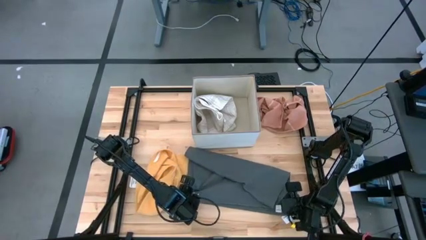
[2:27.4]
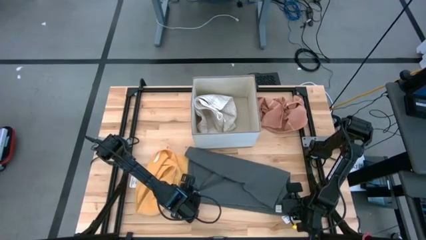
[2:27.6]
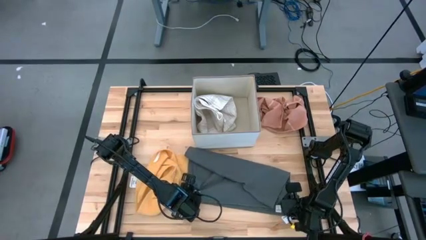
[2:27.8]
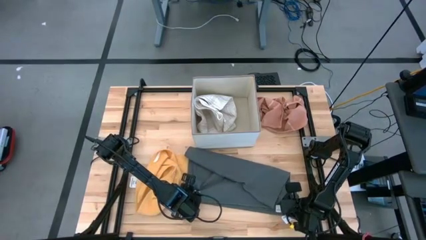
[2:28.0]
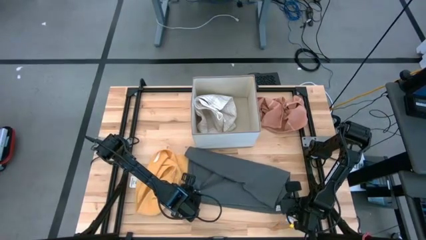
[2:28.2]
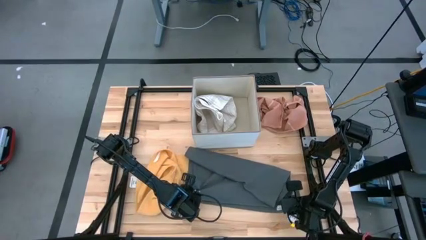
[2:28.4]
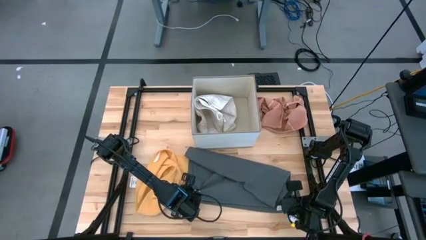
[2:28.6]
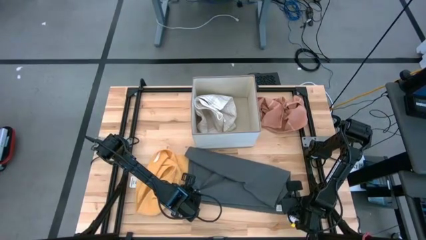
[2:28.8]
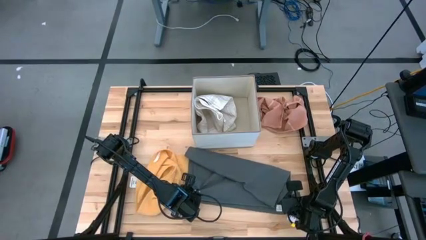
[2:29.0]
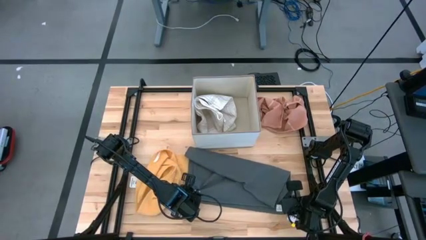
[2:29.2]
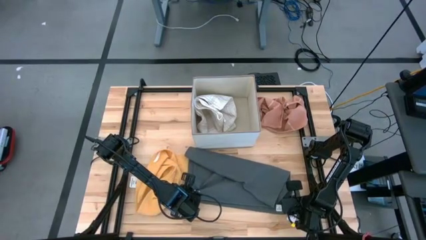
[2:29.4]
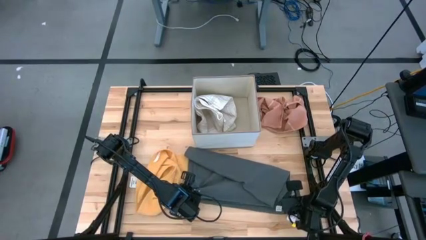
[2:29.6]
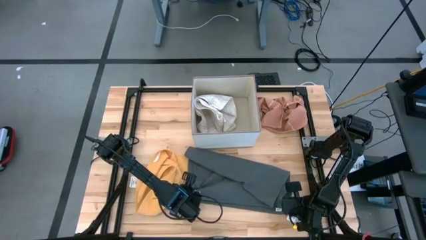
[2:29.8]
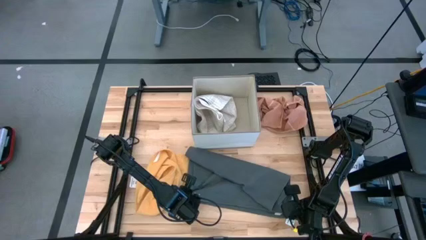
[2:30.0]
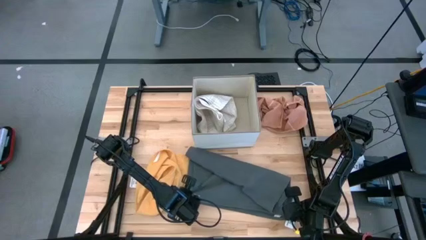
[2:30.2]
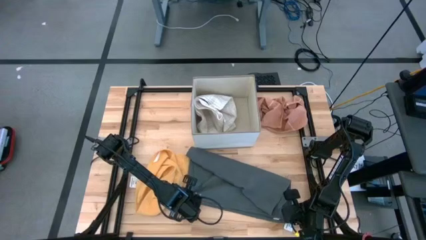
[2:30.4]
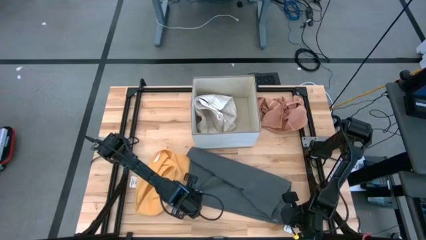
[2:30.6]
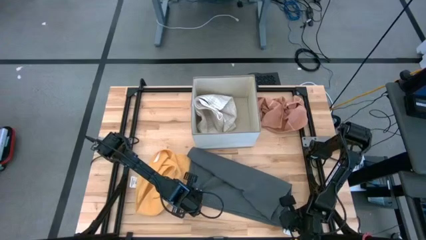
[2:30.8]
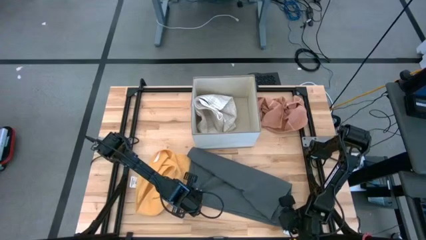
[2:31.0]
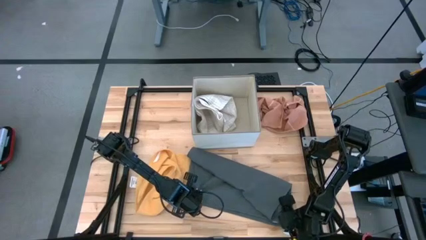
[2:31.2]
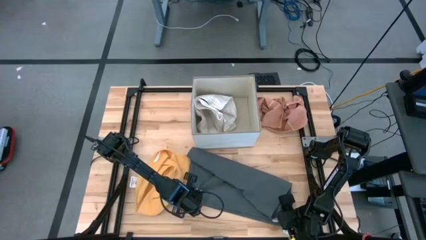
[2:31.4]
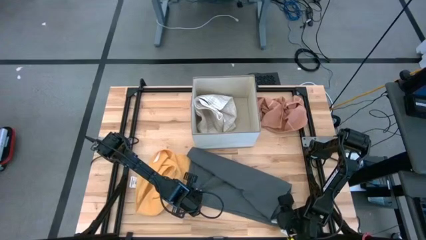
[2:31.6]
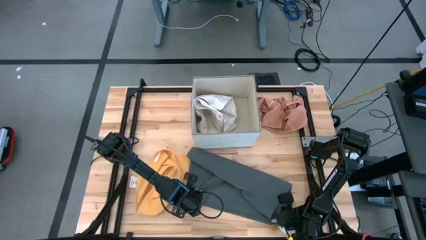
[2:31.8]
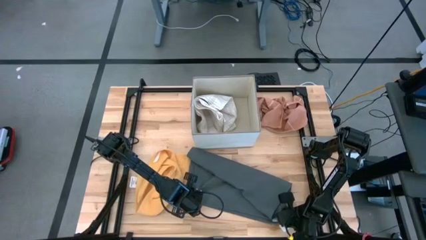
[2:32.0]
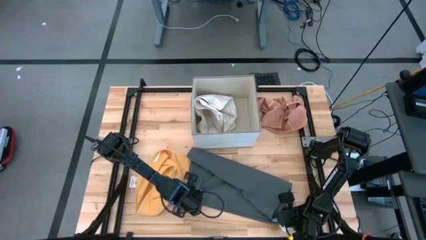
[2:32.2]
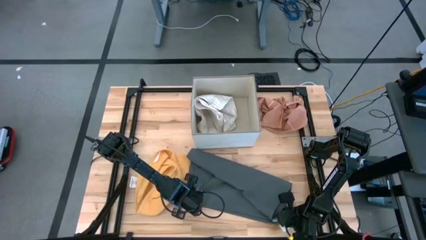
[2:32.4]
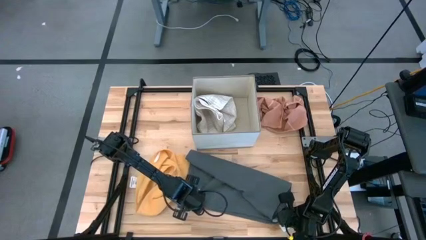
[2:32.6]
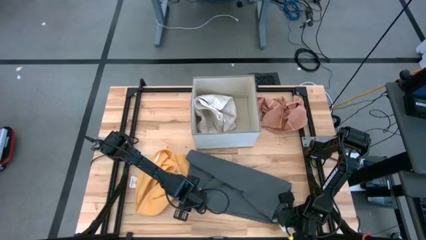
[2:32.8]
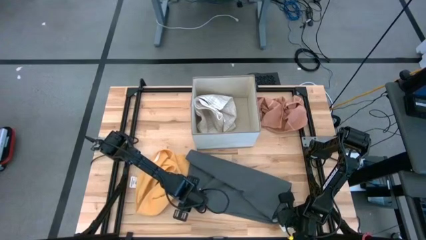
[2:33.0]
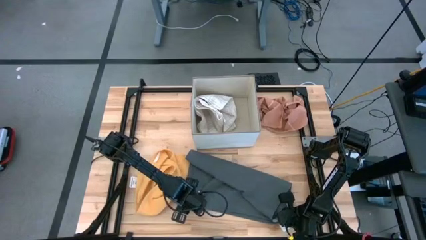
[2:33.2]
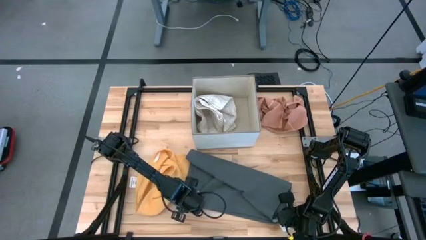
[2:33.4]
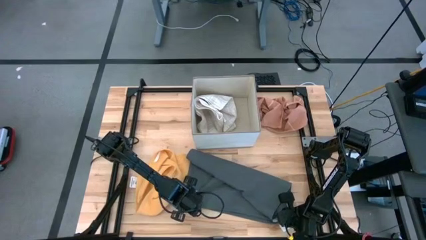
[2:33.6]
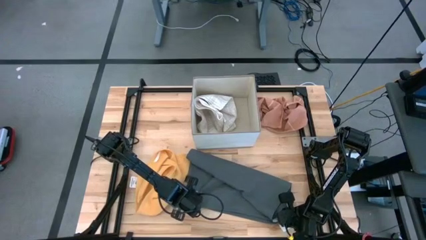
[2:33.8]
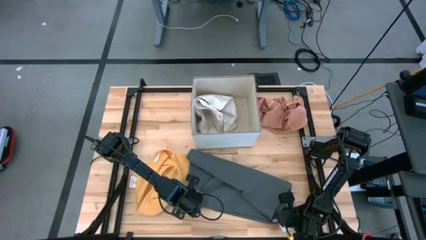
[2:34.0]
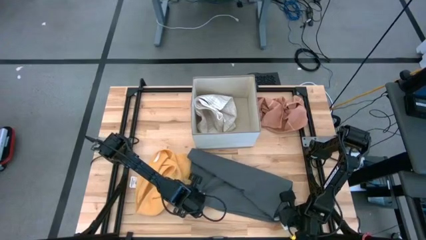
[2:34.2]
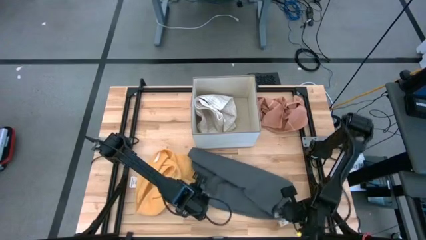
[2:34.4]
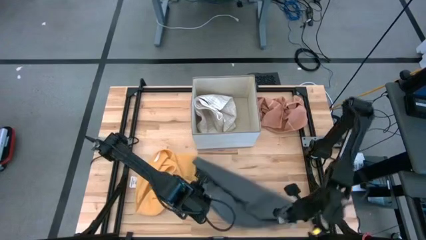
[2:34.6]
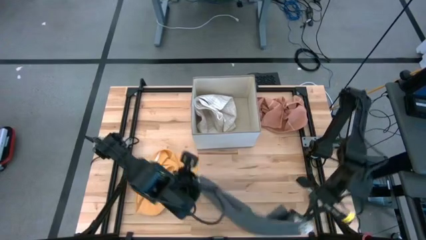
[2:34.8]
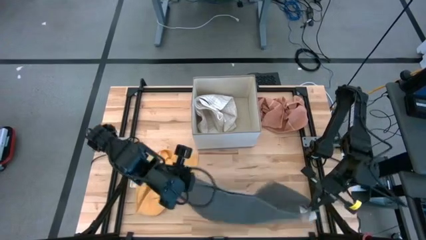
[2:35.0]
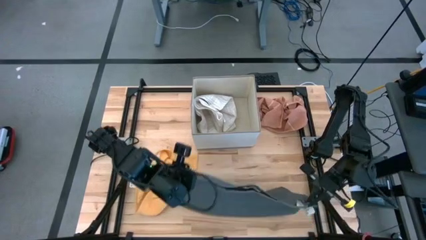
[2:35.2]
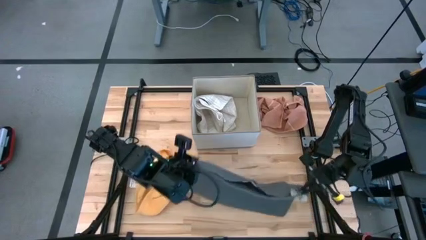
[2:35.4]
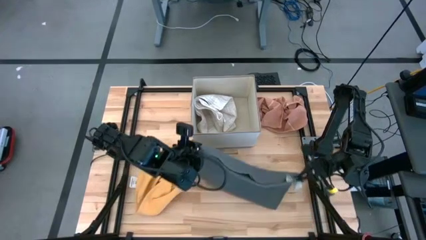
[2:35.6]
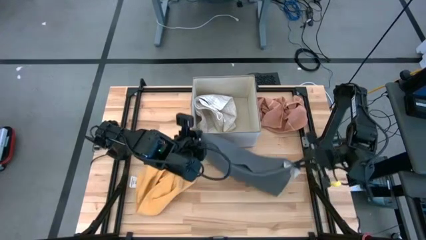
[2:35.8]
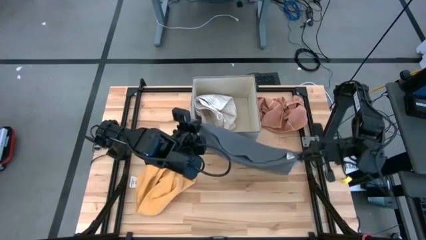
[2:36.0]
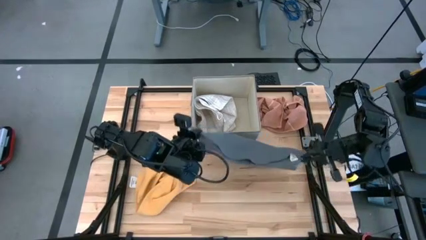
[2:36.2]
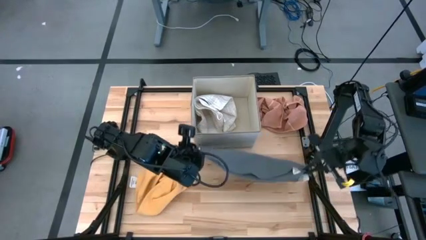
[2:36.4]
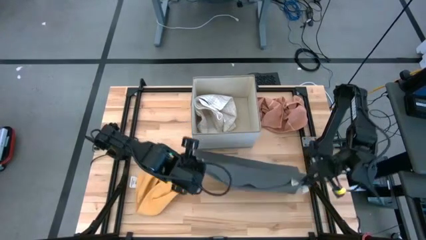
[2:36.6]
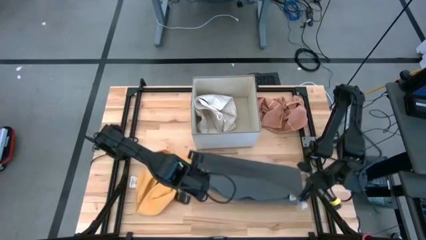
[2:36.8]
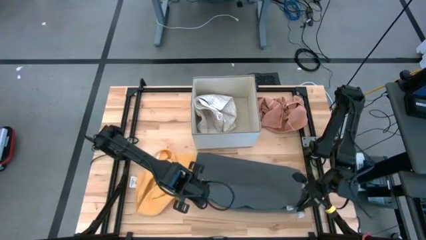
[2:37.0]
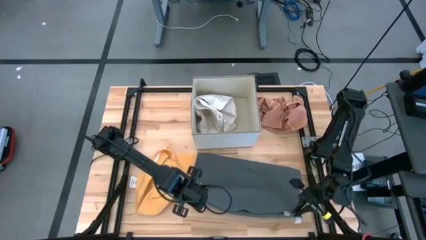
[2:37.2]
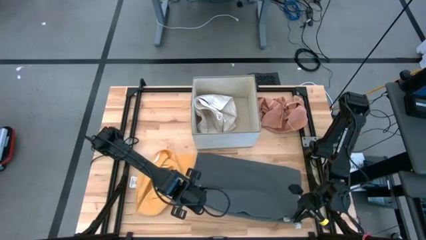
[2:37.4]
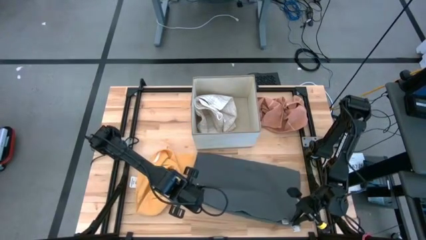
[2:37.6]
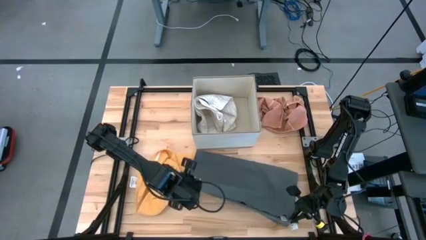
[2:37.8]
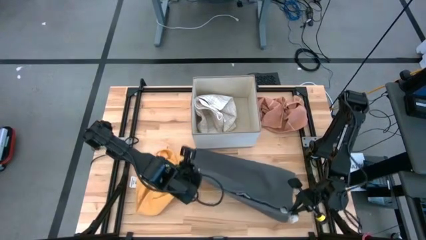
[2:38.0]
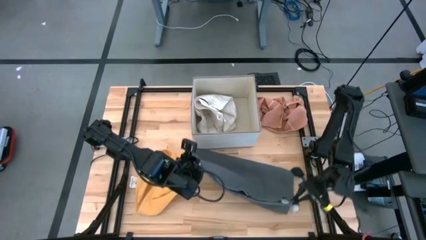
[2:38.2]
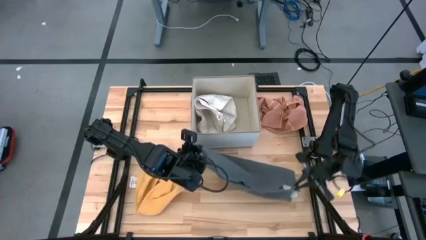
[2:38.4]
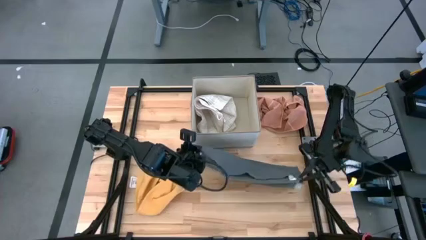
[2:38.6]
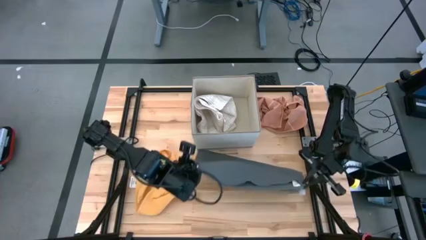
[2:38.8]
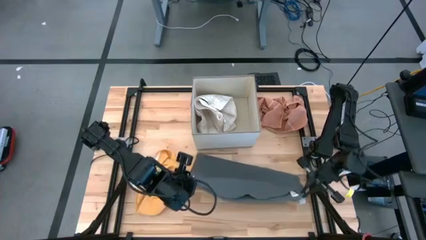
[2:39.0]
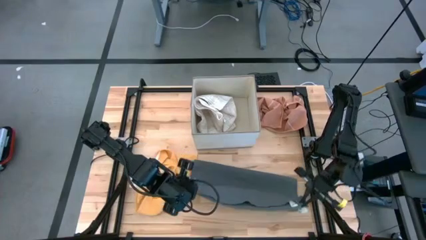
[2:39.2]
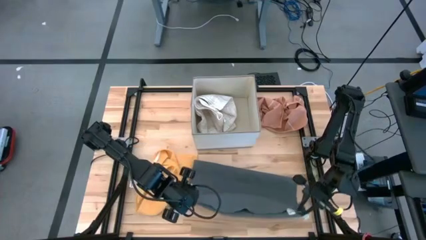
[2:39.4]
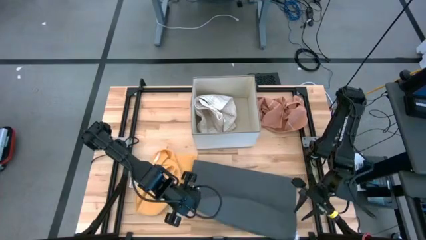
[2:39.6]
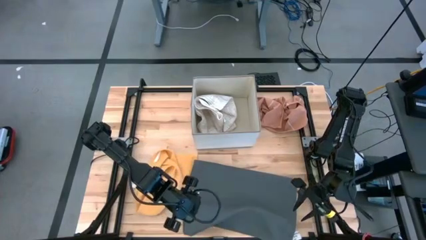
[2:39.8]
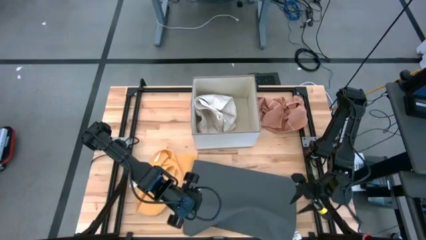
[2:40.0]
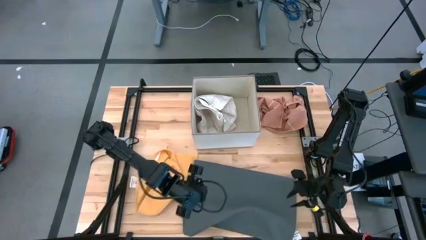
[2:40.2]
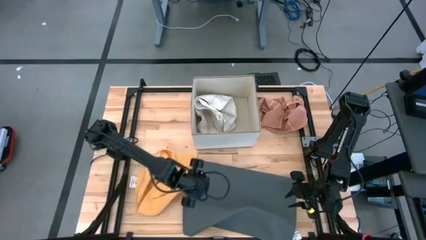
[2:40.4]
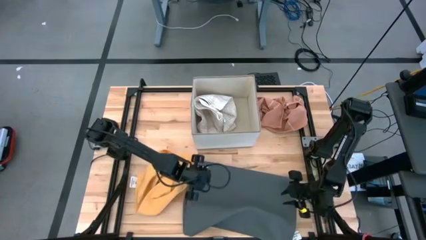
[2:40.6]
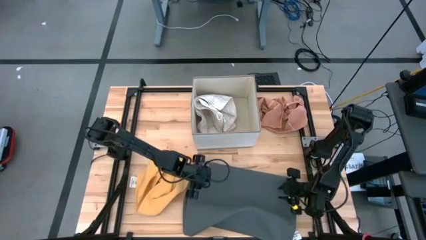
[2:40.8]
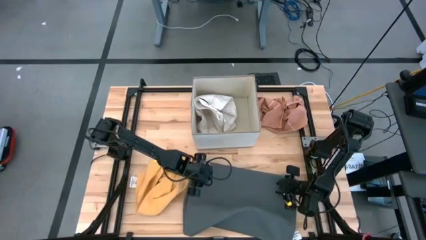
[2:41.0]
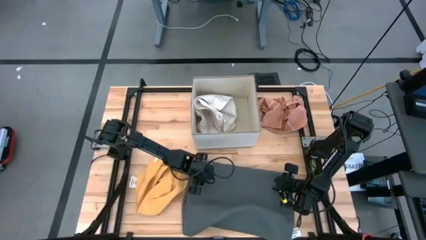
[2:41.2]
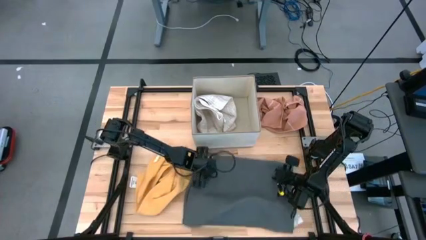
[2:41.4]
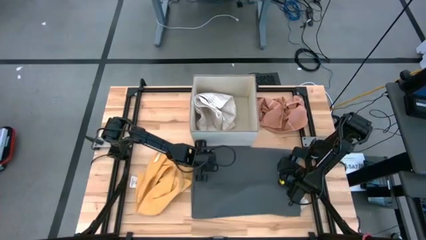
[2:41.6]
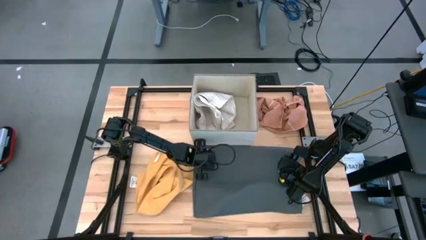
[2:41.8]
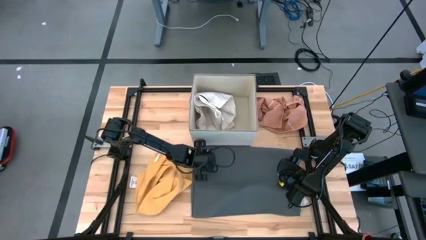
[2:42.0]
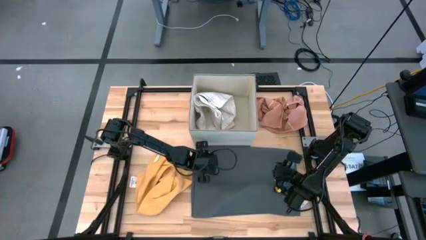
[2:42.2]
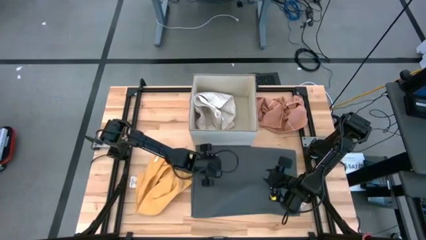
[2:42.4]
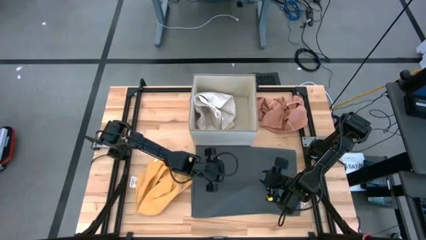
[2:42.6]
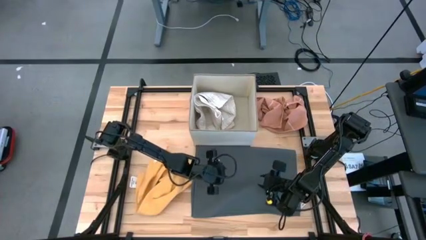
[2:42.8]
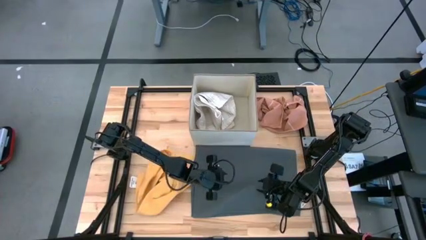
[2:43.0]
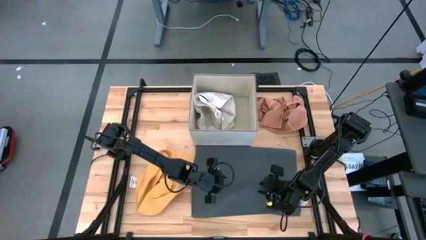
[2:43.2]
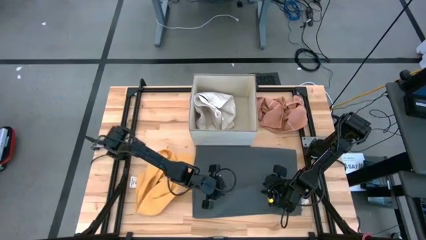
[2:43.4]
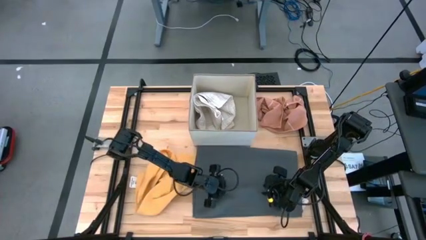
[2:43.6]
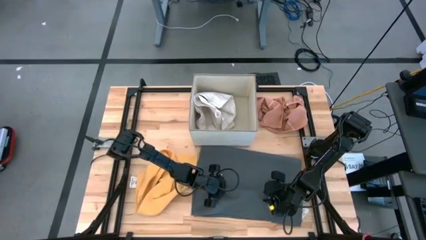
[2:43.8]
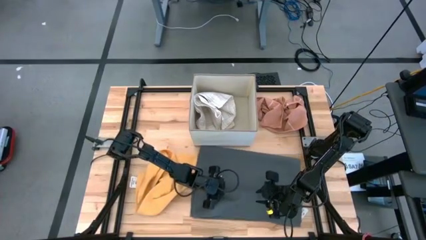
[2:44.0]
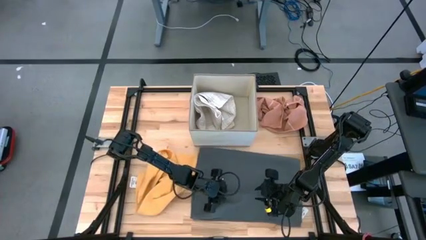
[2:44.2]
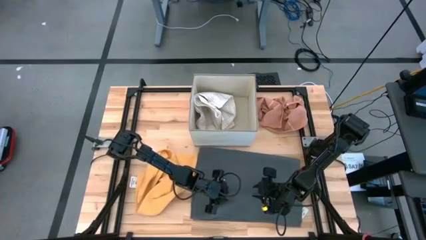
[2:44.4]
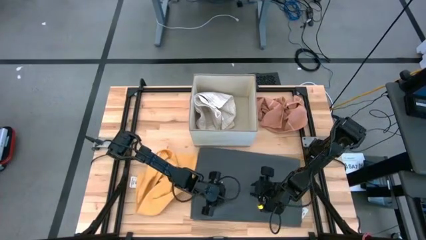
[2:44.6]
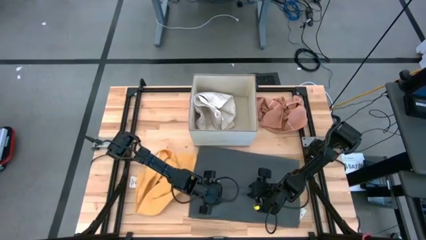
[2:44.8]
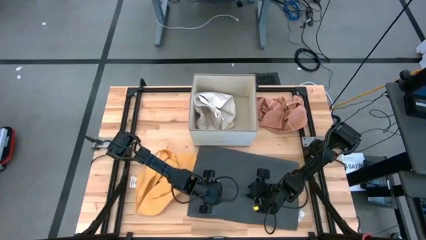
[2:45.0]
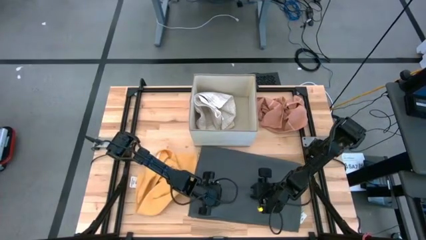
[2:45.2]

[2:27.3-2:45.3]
Task: Fold towel
Fold the gray towel
